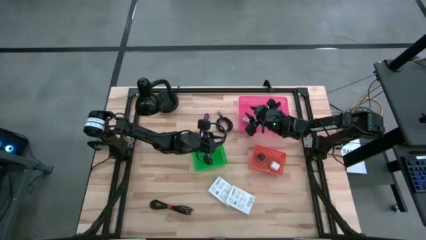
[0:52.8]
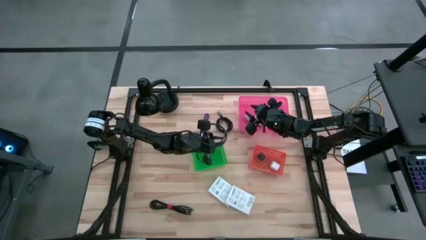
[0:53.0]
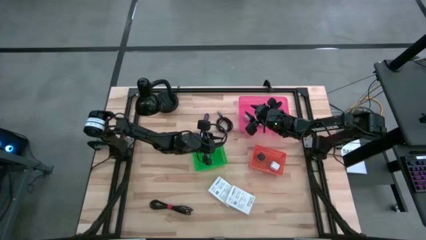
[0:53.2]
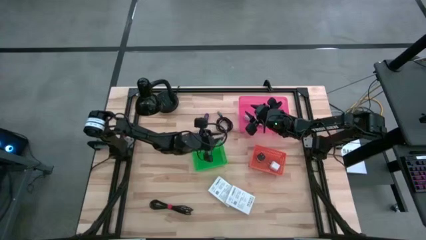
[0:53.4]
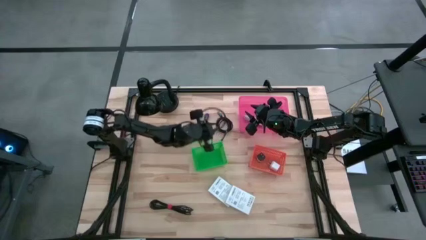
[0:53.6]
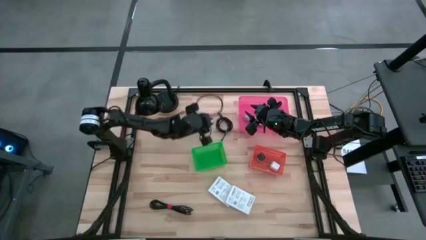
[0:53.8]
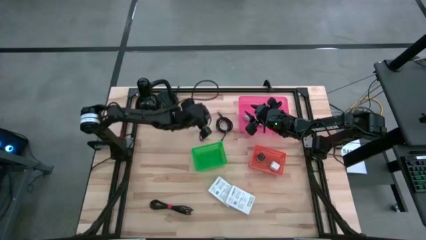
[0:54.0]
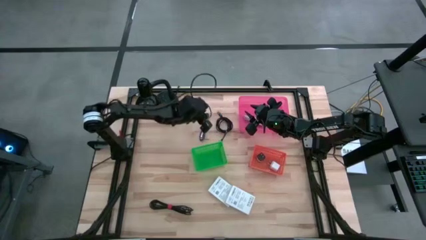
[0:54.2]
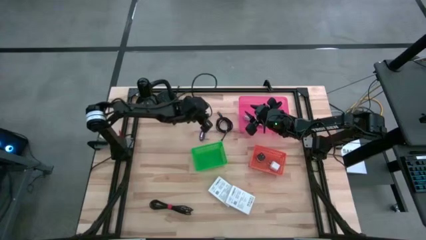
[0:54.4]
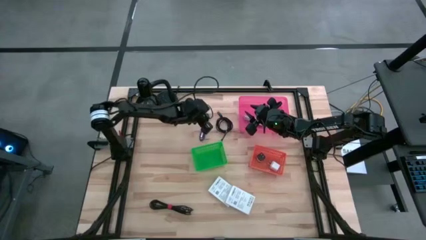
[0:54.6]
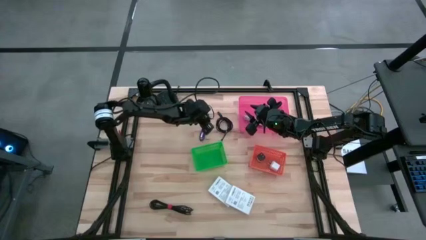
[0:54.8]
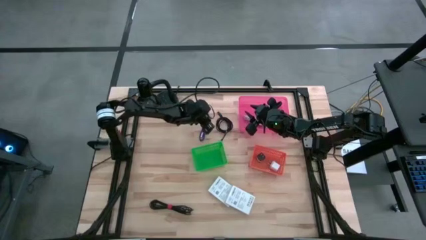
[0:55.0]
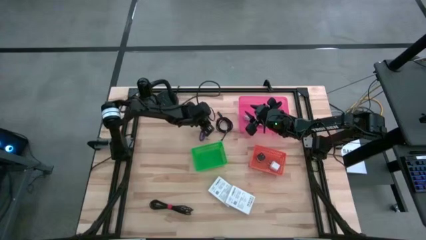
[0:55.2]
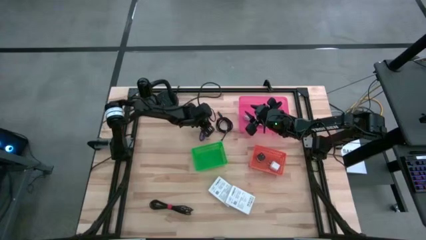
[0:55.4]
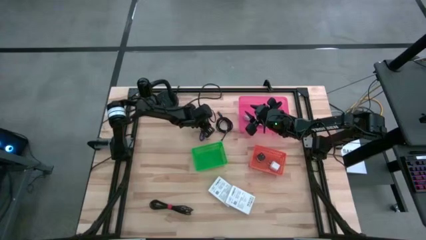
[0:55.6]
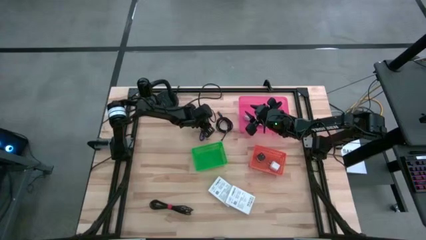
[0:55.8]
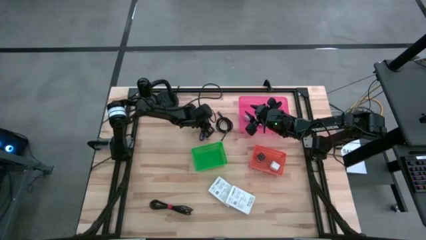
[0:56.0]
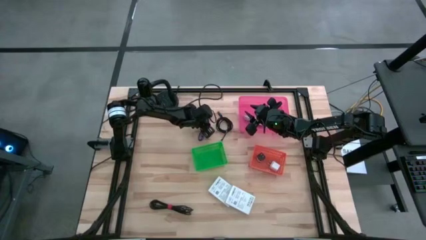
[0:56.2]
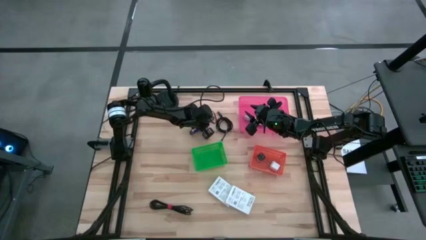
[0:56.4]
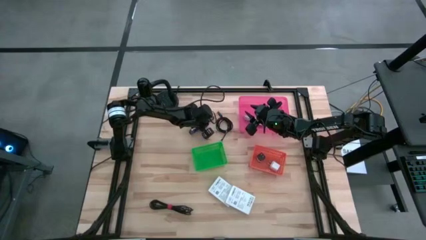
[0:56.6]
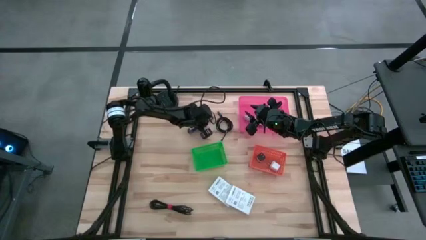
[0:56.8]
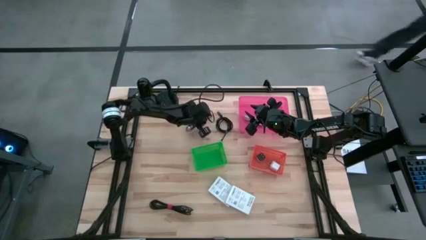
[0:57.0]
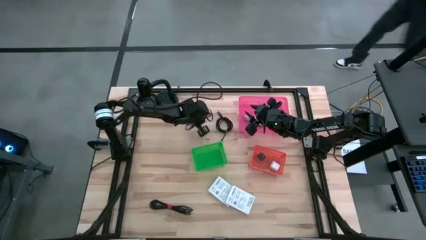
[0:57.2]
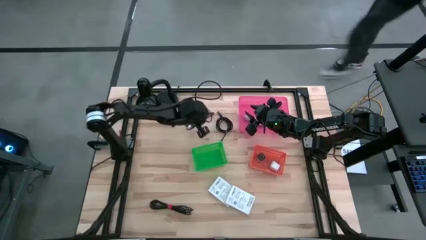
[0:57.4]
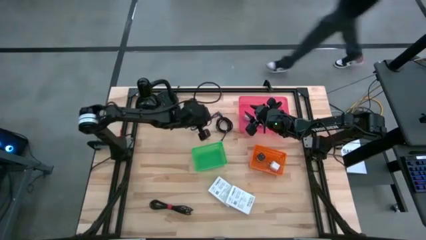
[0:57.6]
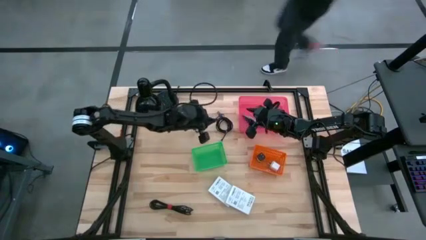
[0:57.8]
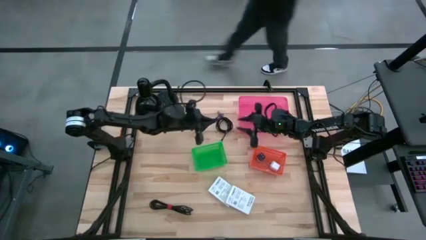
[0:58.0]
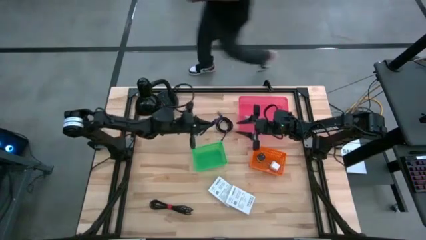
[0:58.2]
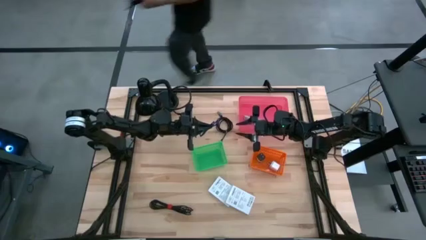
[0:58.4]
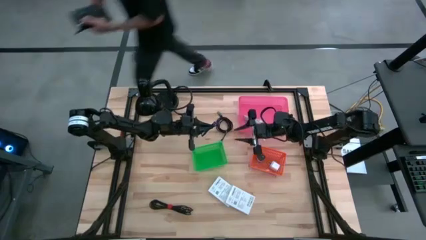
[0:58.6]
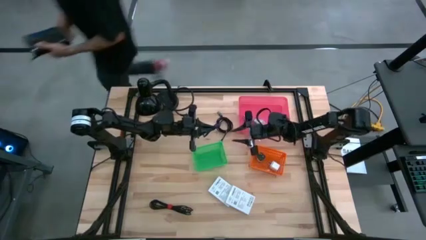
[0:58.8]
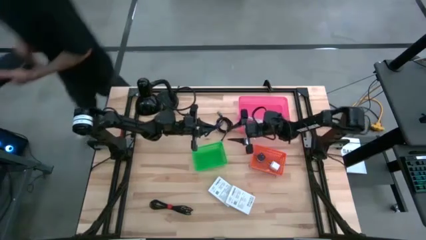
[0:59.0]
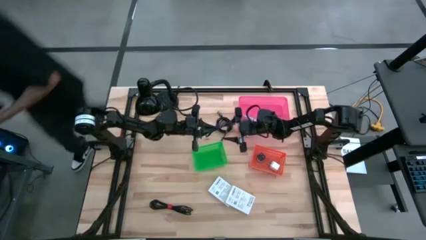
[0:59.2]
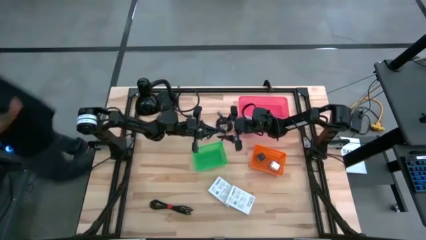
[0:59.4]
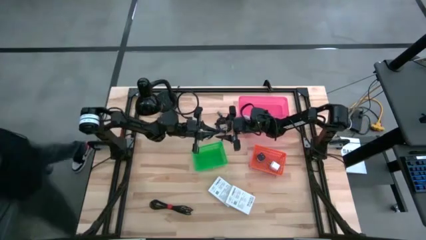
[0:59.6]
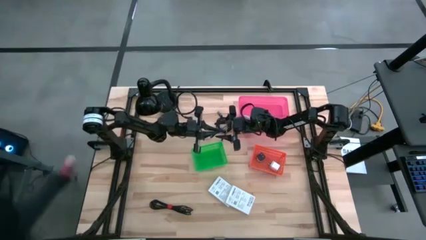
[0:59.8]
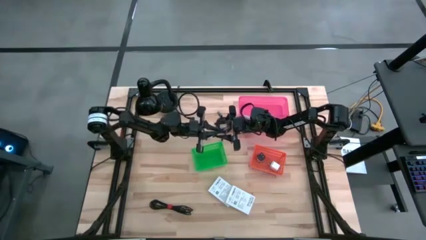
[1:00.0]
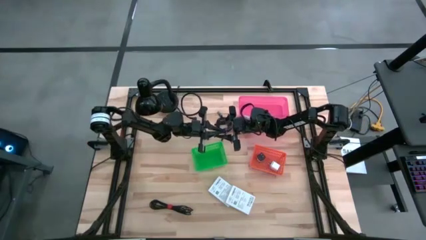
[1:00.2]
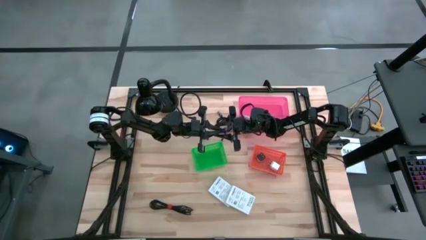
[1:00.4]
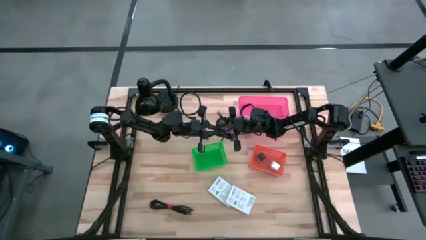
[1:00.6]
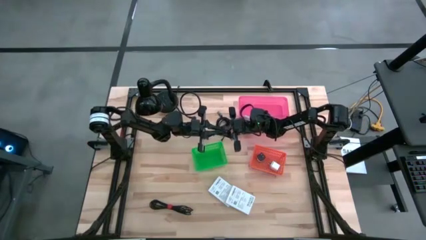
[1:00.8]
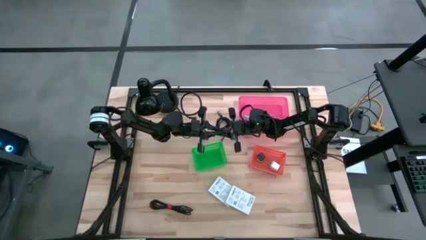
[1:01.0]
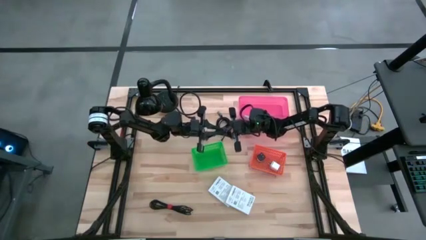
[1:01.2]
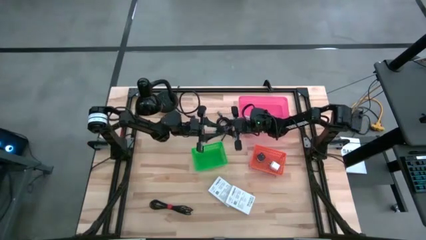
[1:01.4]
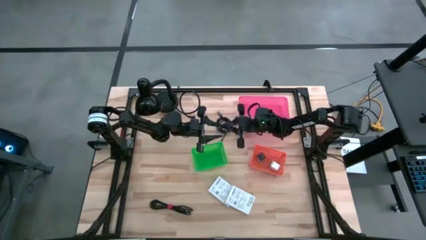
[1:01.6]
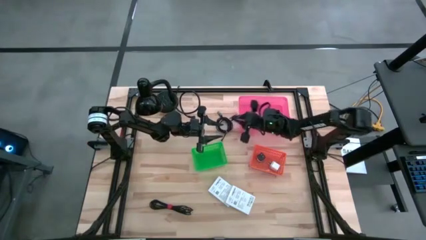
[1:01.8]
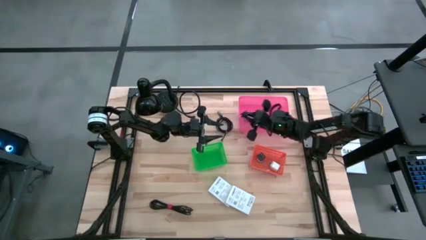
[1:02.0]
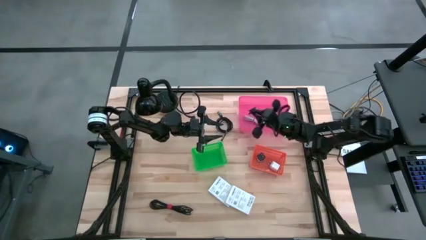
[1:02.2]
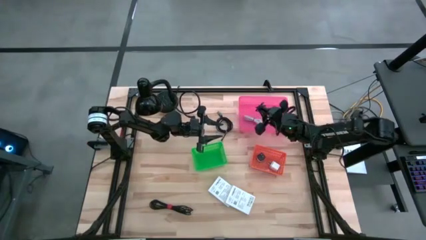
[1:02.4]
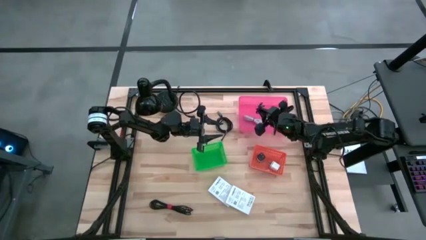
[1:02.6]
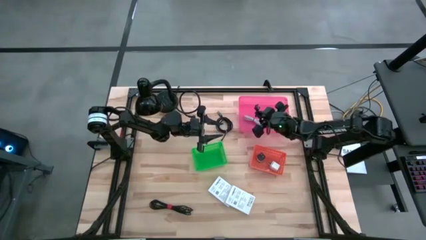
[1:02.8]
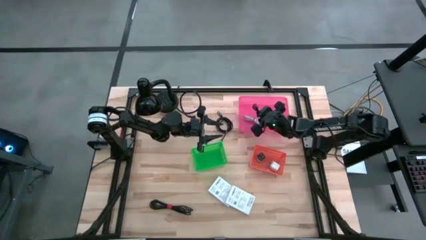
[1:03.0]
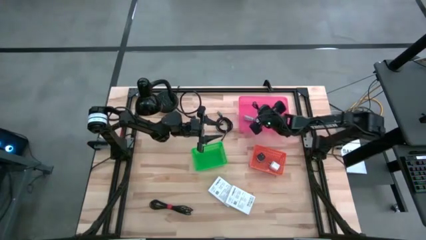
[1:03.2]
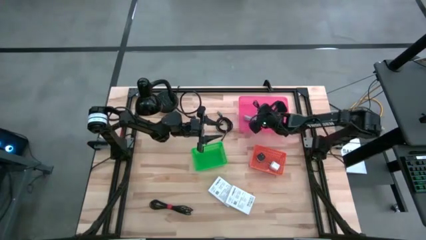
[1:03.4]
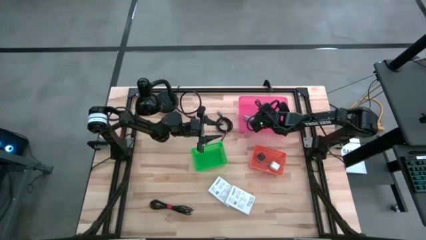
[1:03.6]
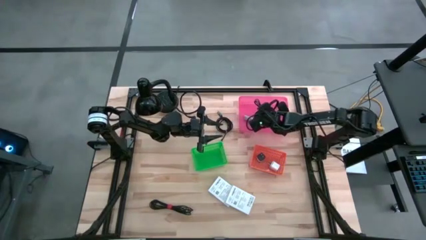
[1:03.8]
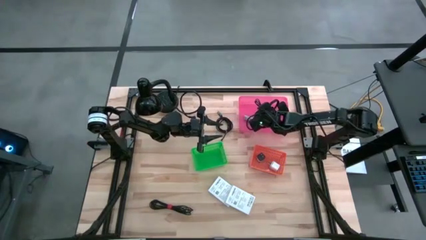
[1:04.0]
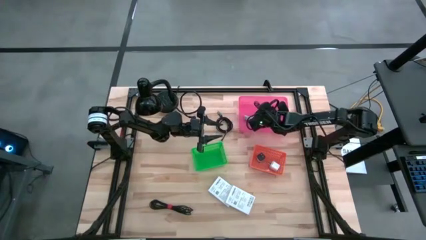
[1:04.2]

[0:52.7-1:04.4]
Task: Pick and place items into bin
Put the blue charger cable into the pink bin

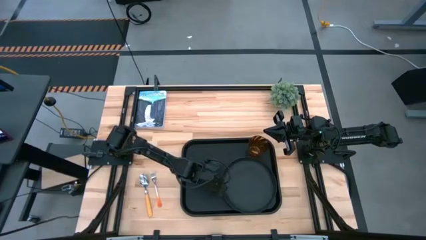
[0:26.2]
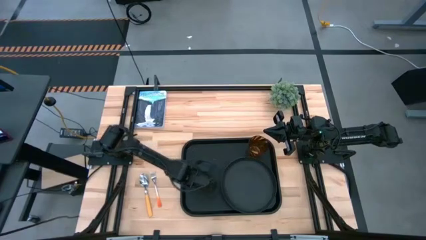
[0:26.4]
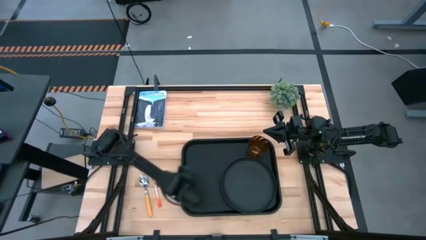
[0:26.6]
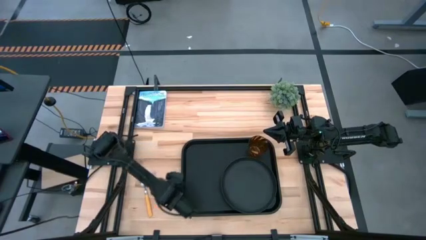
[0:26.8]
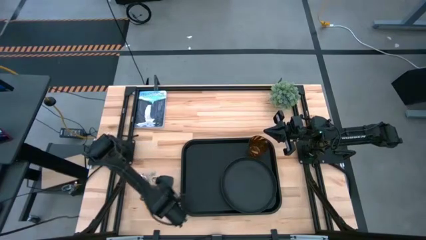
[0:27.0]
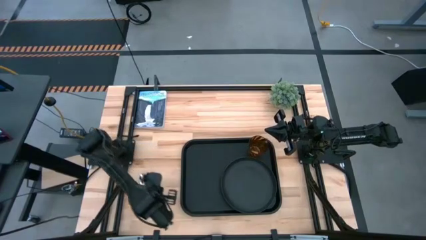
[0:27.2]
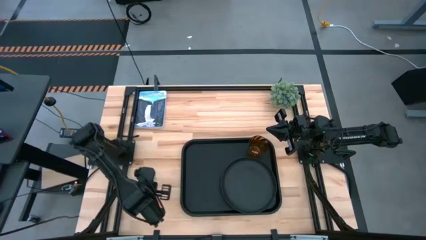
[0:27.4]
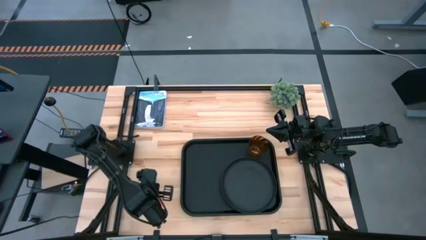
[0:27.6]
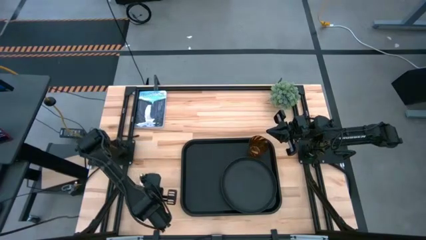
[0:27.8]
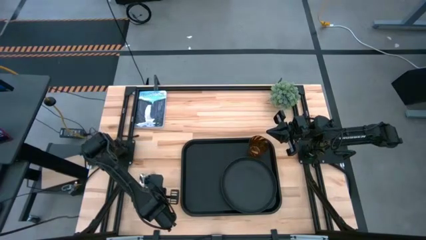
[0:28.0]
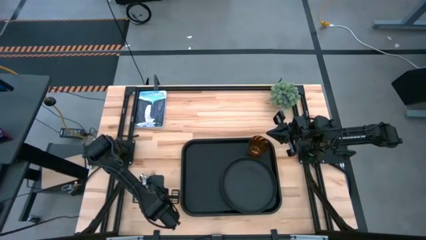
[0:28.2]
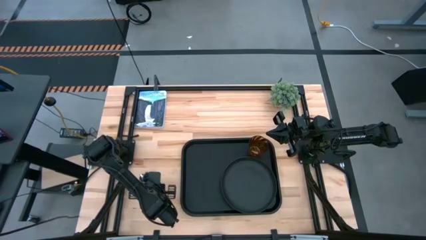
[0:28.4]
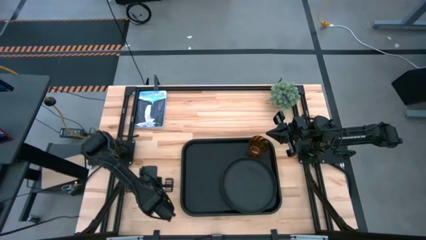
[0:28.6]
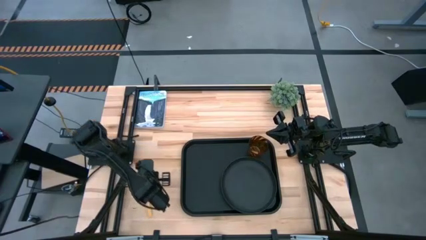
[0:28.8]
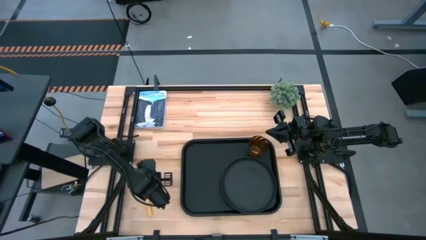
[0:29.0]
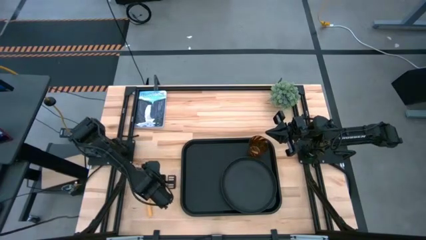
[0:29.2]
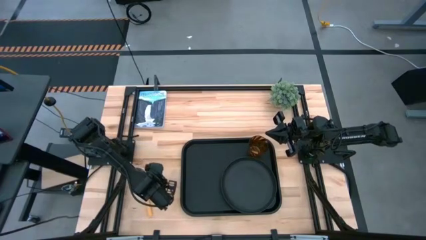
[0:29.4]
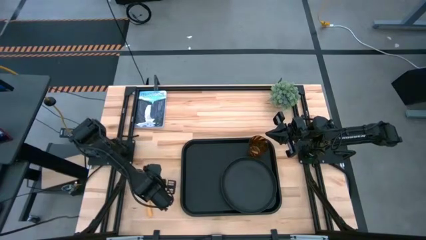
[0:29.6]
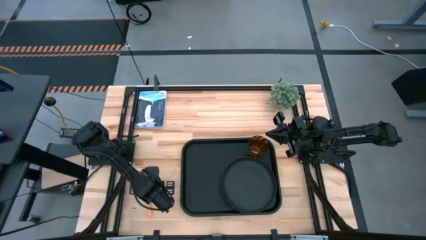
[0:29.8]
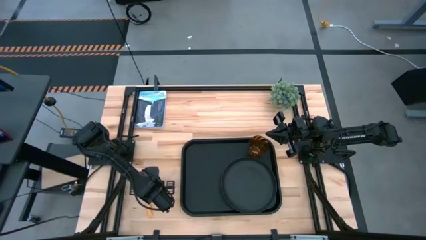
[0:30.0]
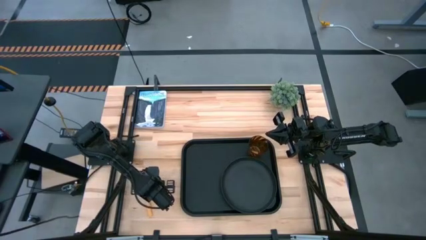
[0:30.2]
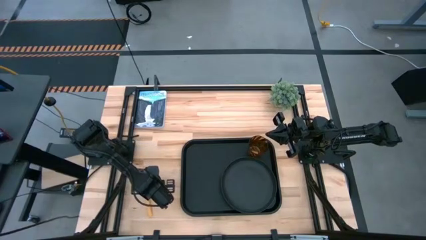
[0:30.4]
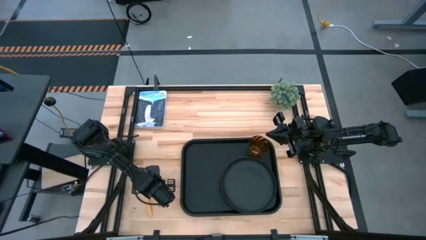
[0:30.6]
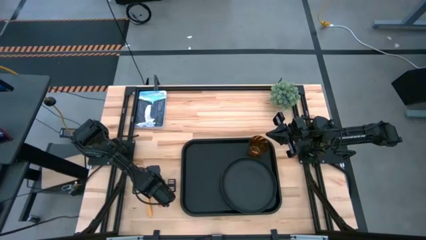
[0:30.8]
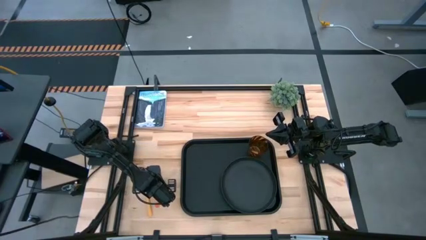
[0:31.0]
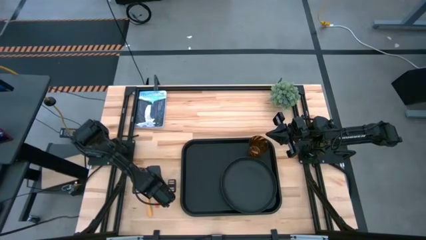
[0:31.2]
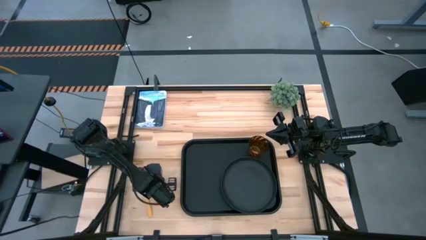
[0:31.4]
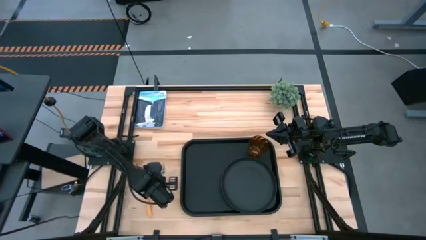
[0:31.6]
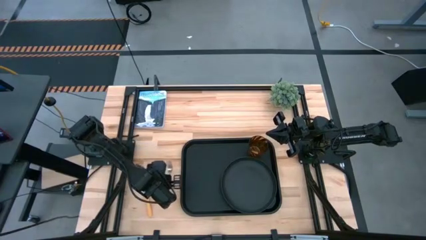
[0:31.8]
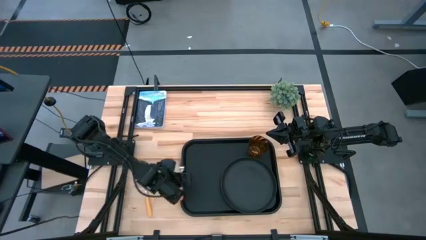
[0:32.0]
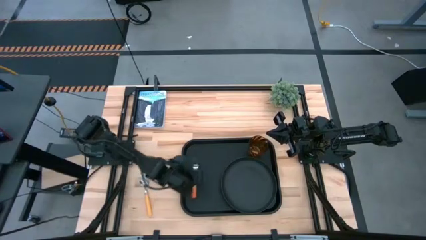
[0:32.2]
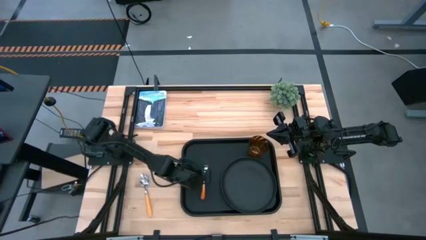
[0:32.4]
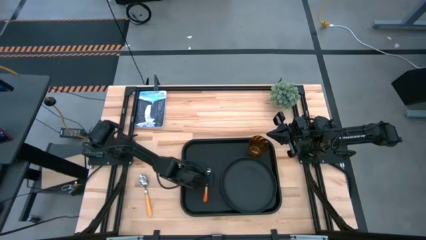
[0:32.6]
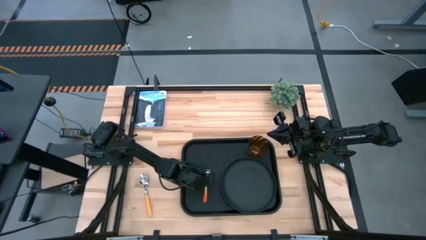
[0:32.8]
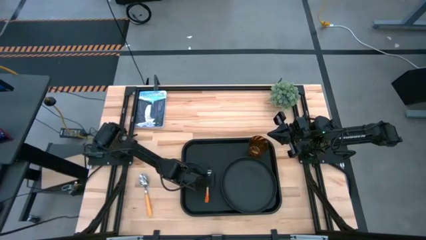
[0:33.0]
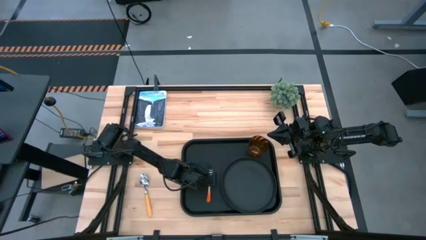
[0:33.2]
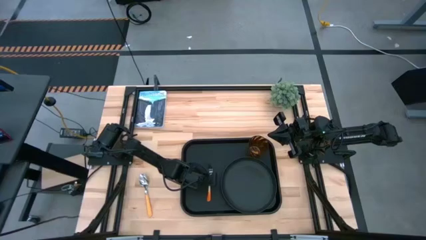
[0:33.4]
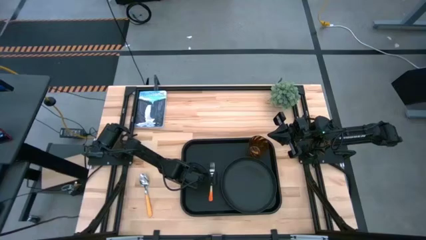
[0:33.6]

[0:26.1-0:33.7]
Task: Pick and place plate/cup/fork/spoon on tray
Put the orange fork on the black serving tray to the left of the black plate
